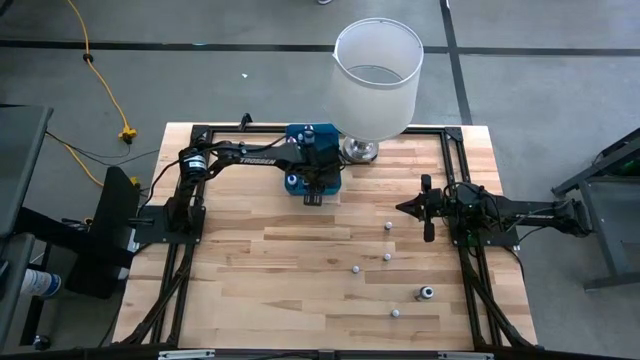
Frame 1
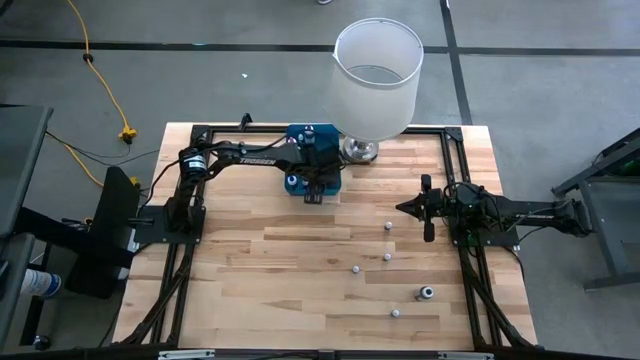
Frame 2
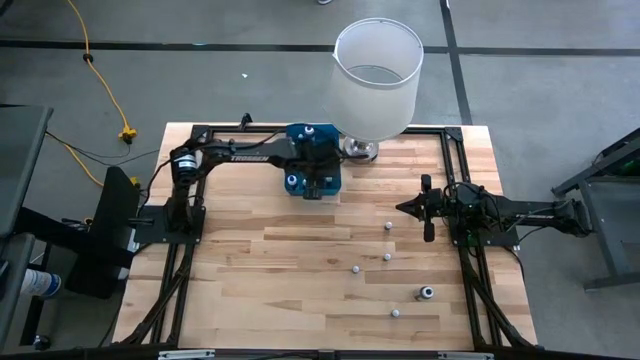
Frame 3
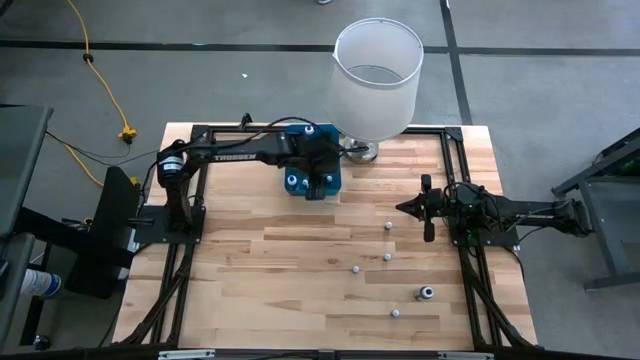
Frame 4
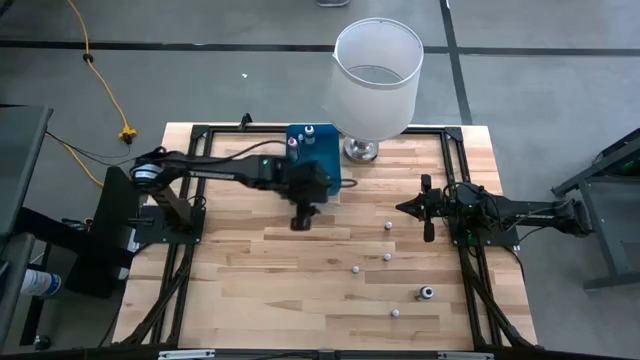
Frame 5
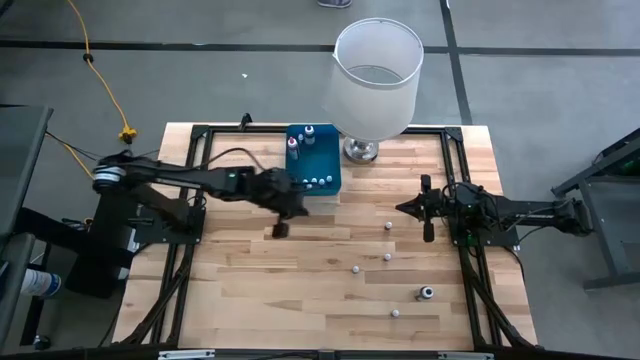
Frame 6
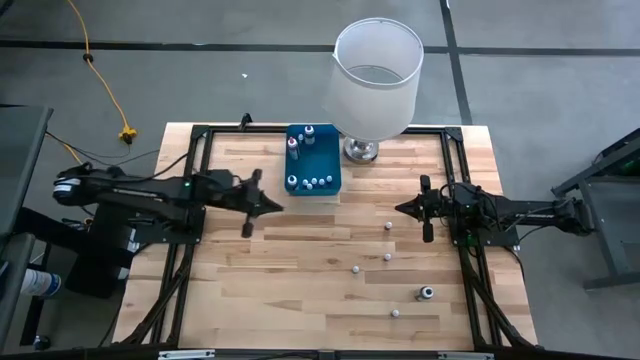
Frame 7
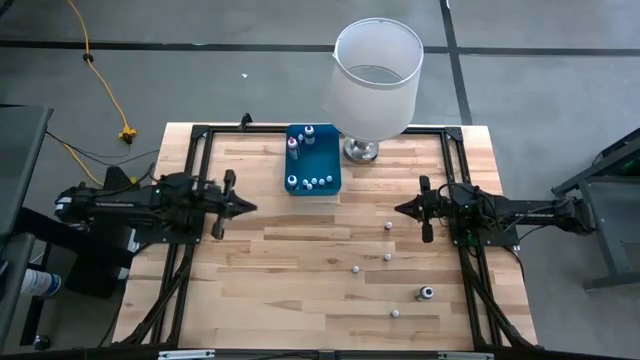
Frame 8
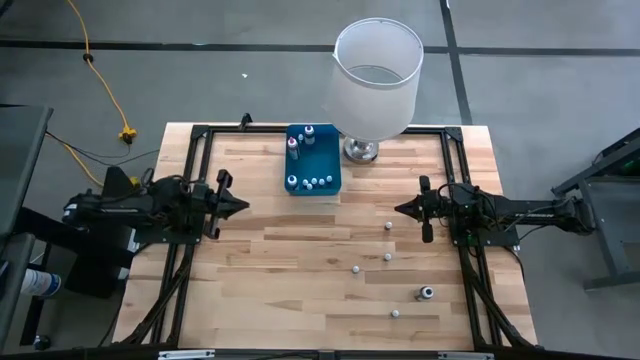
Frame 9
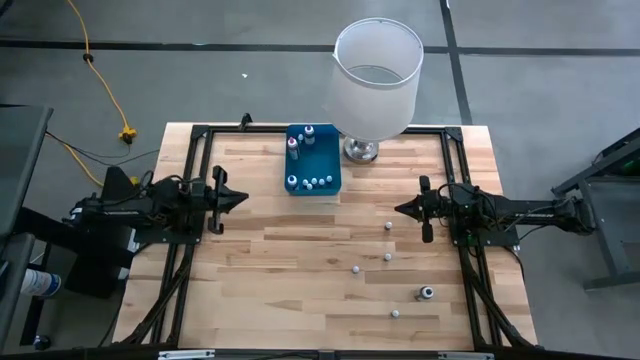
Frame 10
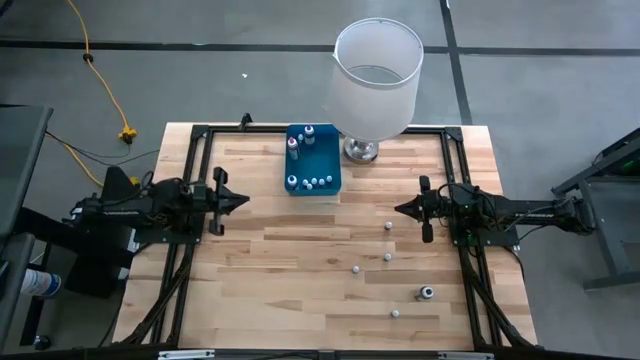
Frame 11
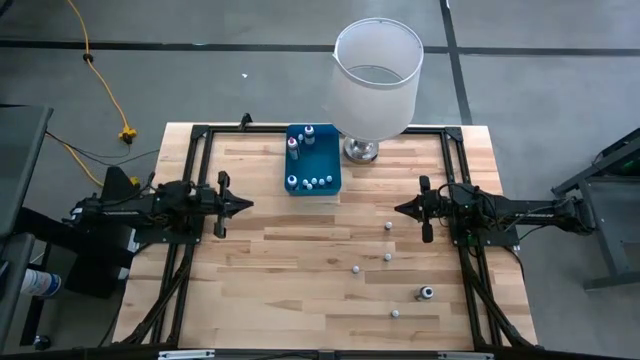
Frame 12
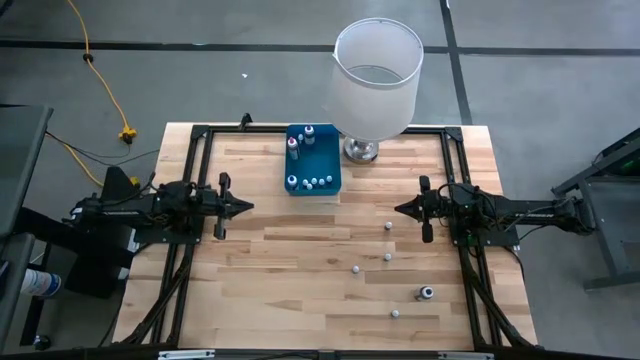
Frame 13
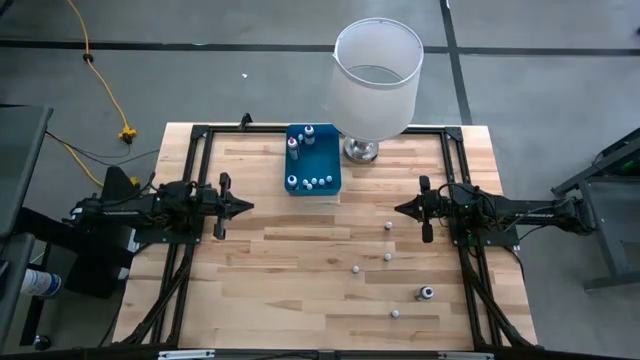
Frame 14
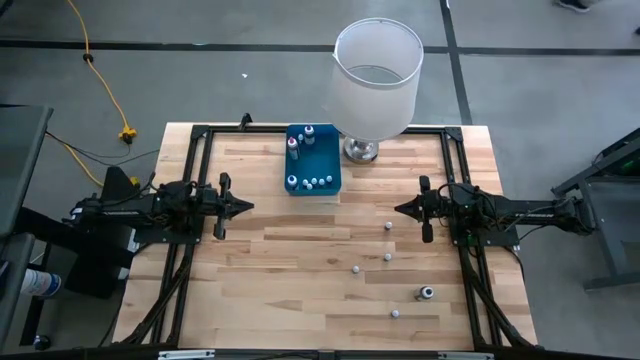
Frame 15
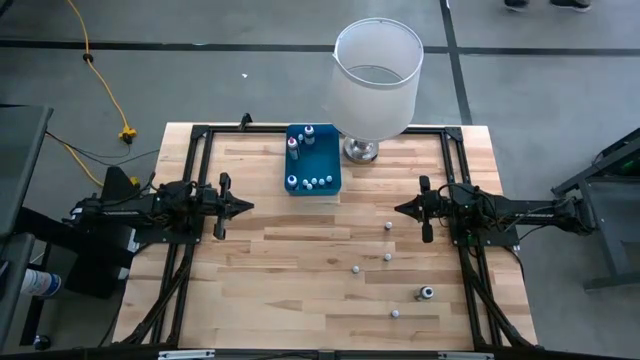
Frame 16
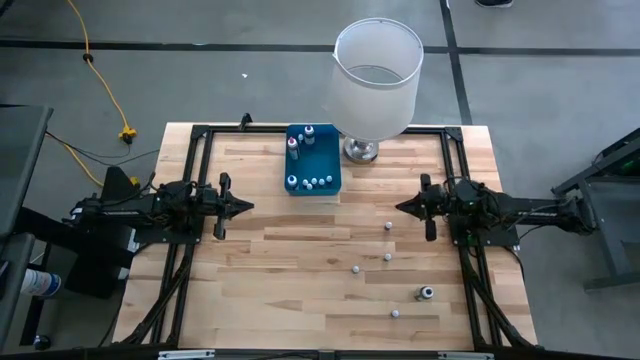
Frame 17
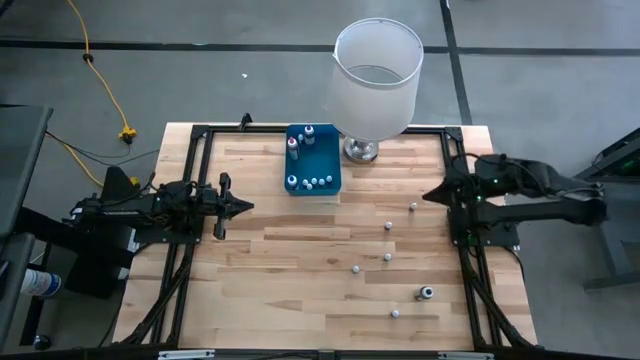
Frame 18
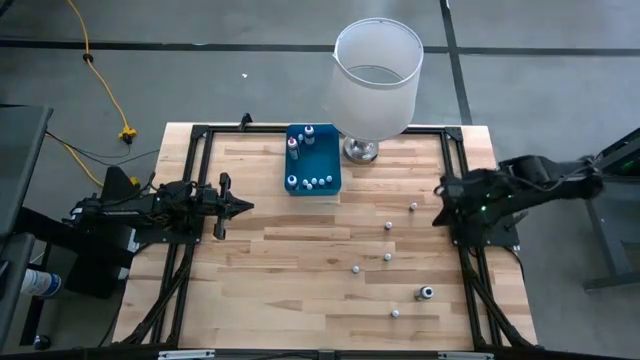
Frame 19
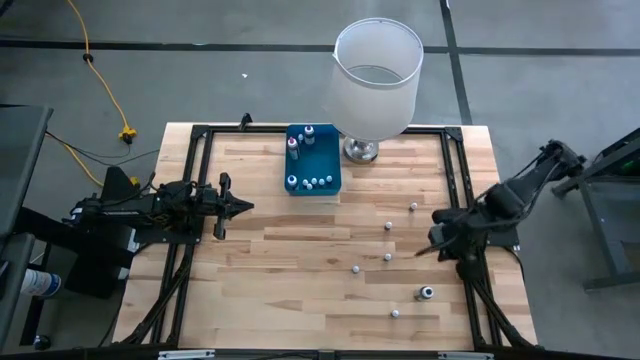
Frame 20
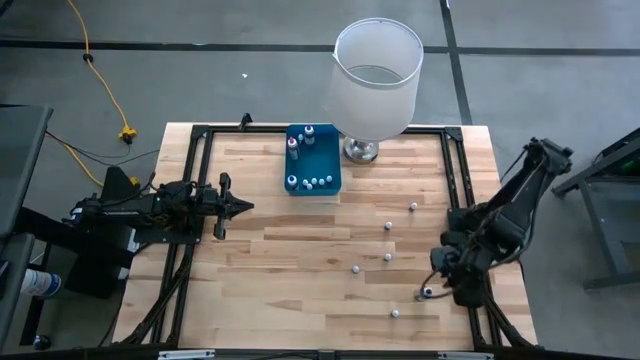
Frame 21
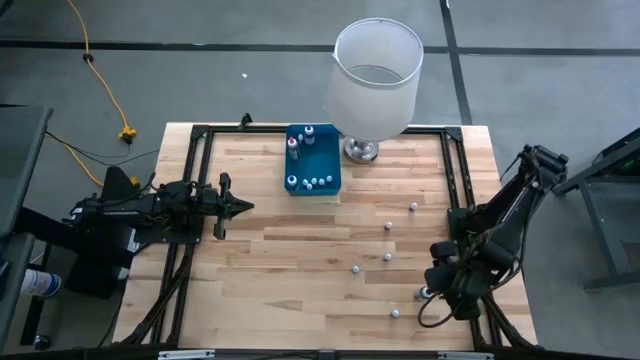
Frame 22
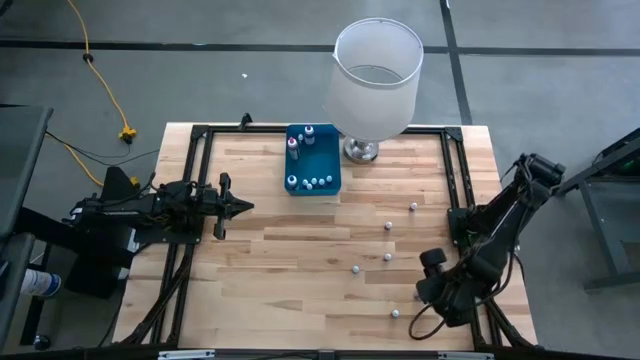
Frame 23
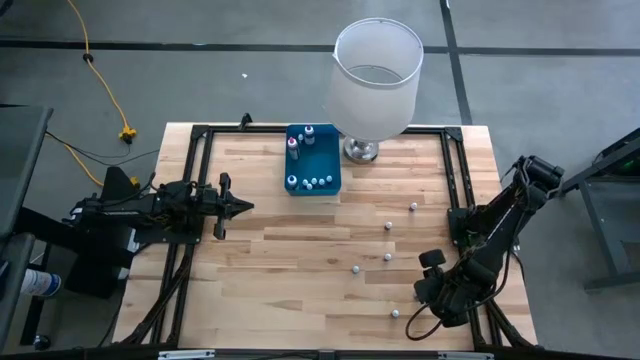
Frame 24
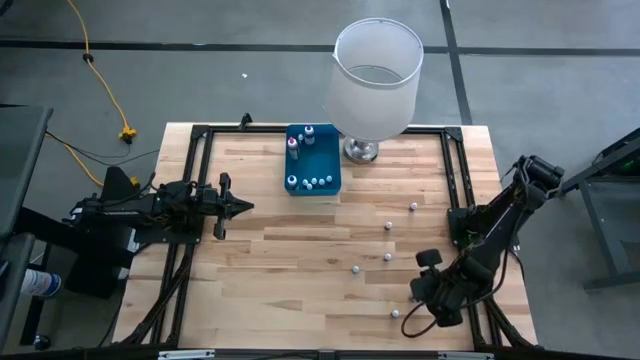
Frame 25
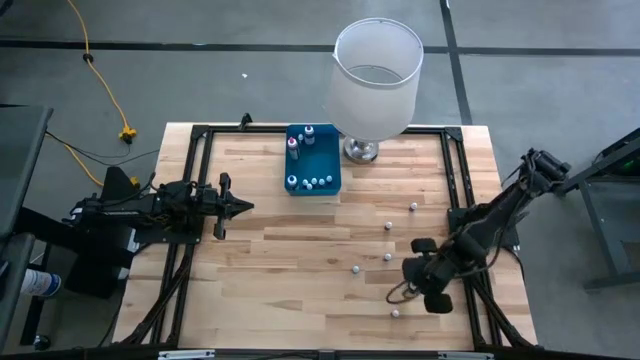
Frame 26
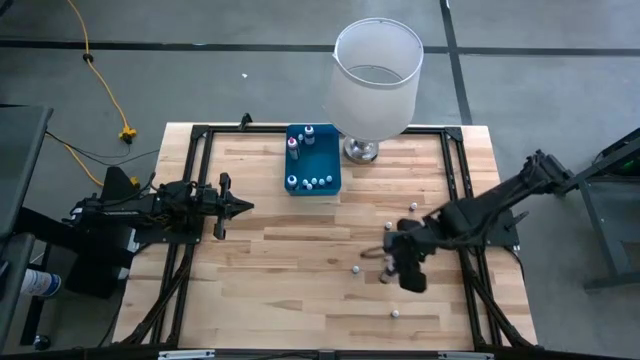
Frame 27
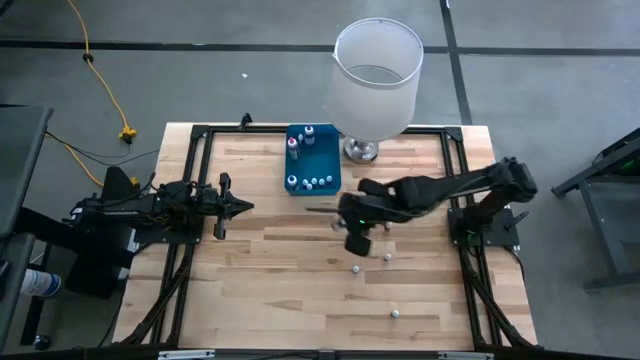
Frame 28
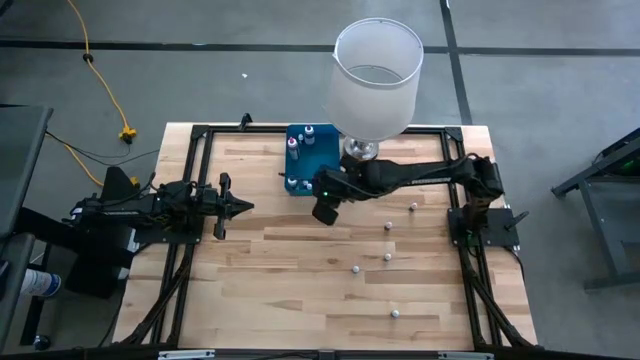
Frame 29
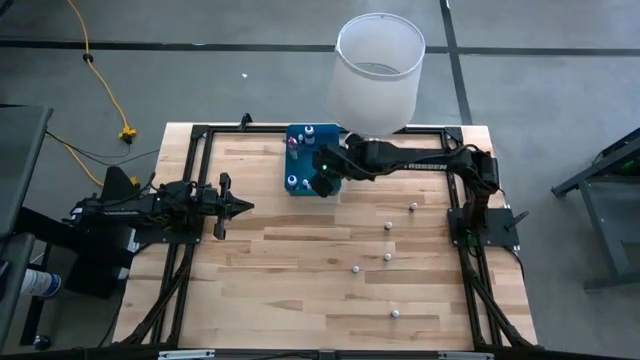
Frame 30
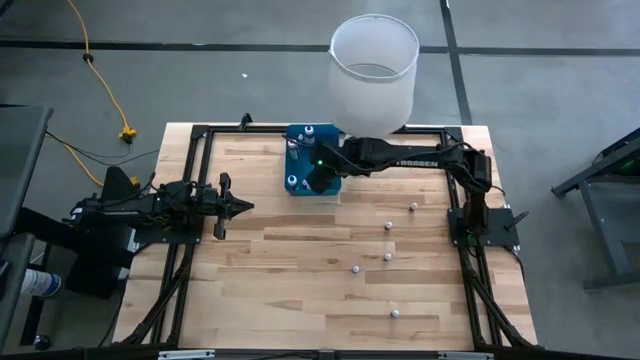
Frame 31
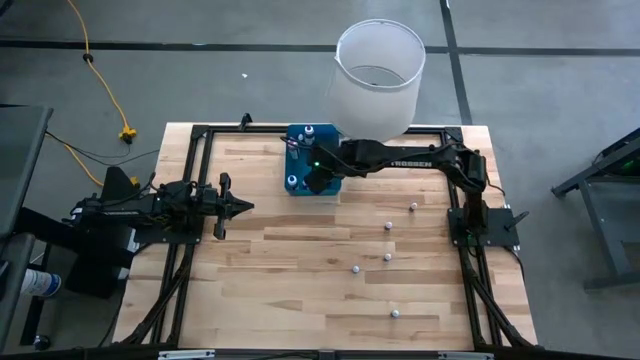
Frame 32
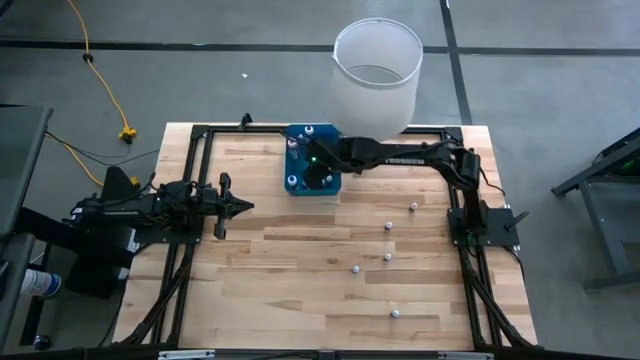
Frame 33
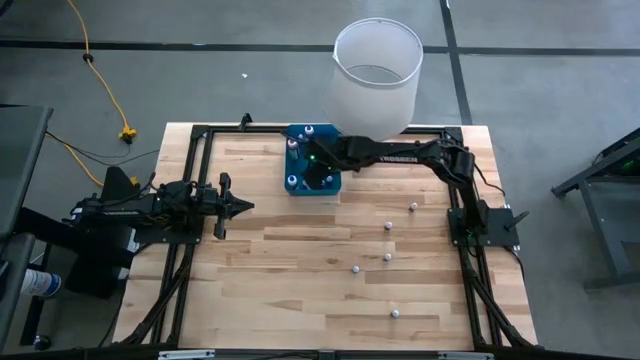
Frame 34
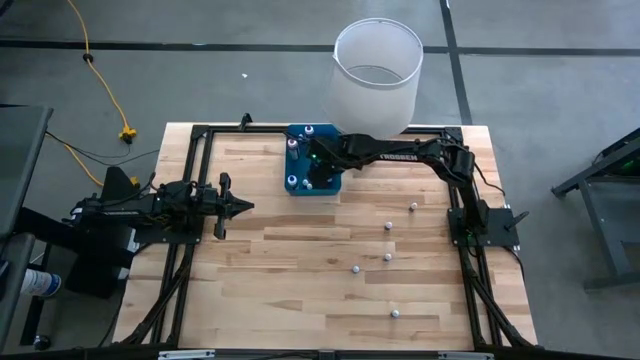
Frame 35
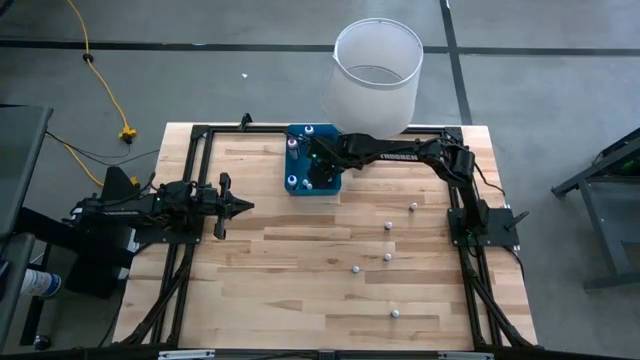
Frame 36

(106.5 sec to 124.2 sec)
Task: Pick & Place food coloring
Put the big black food coloring bottle into the blue bin
